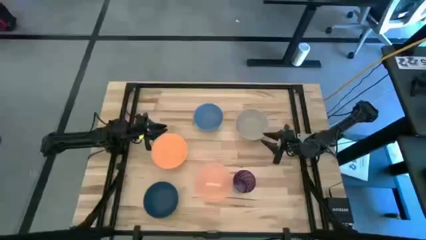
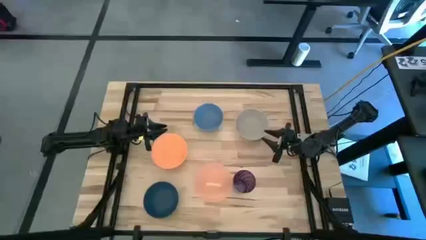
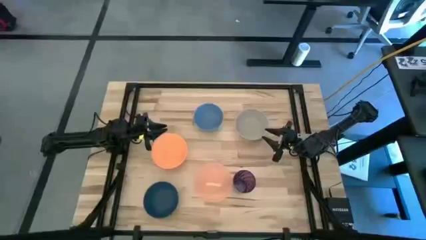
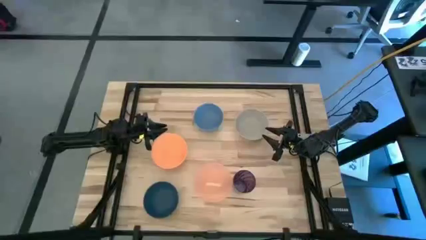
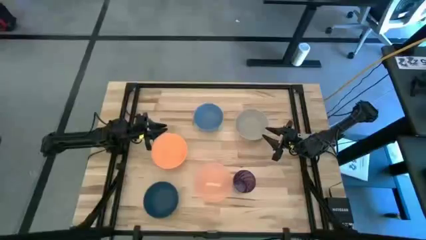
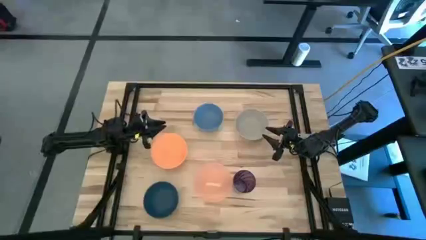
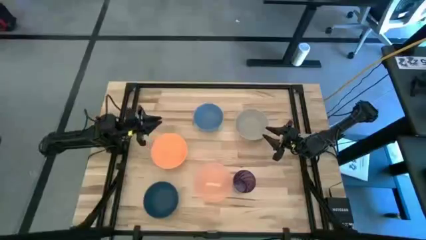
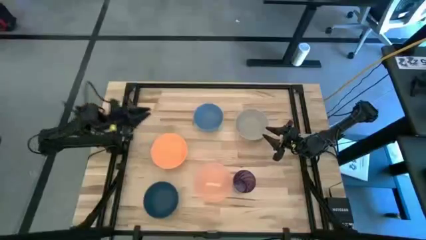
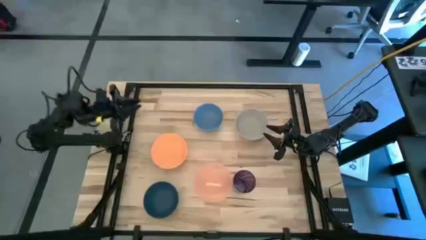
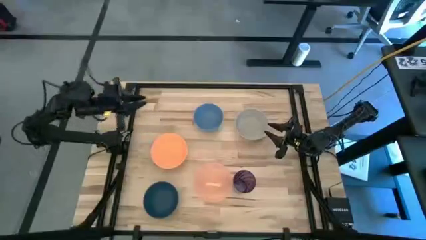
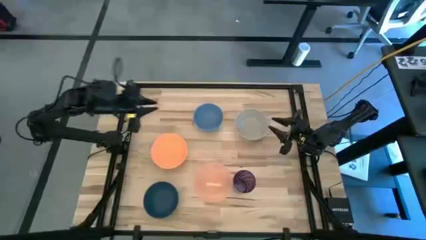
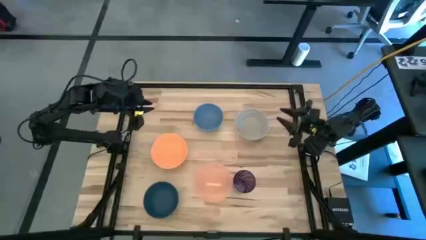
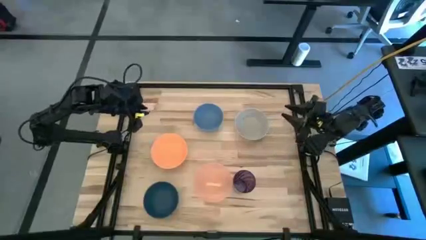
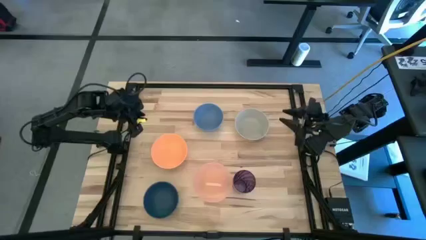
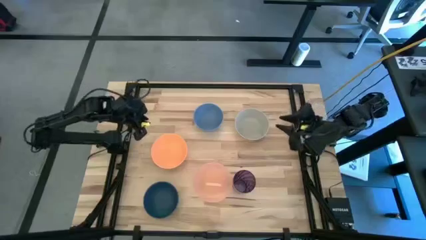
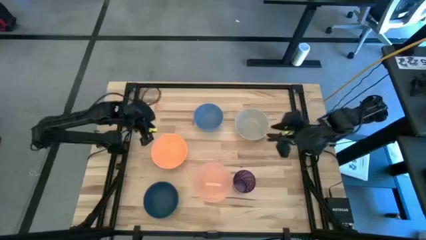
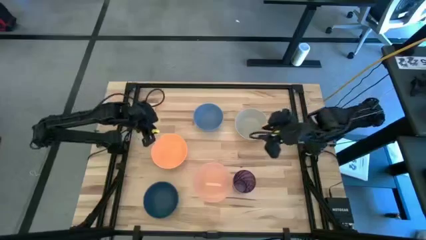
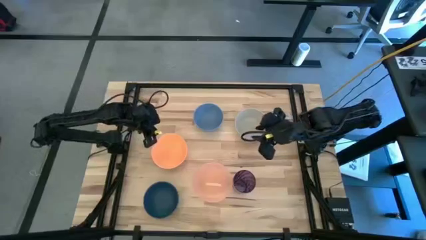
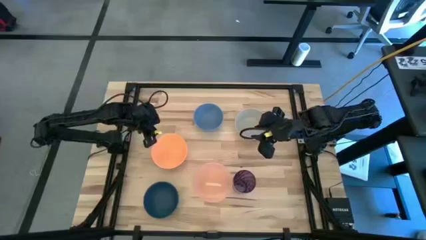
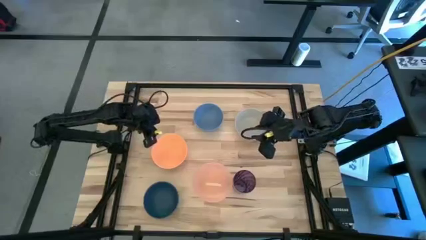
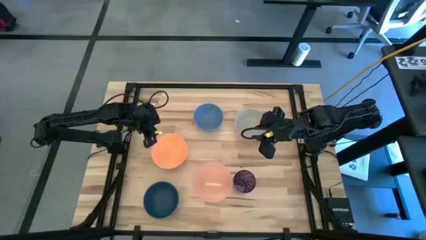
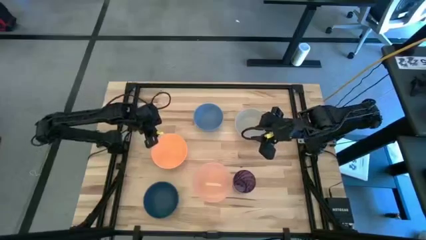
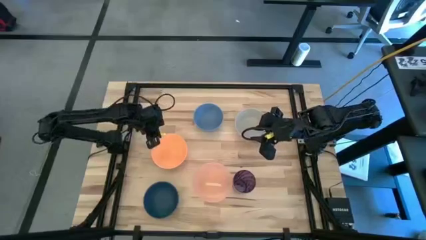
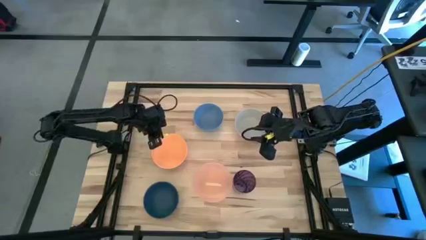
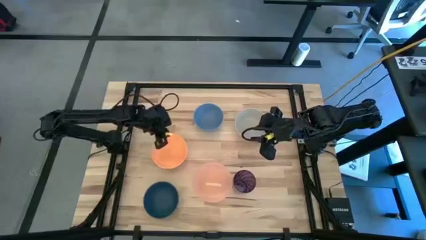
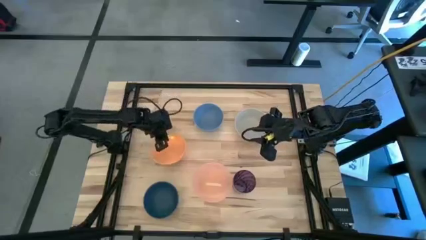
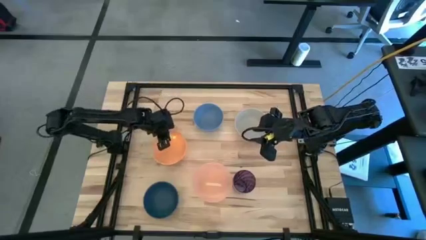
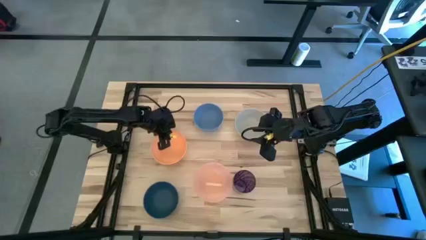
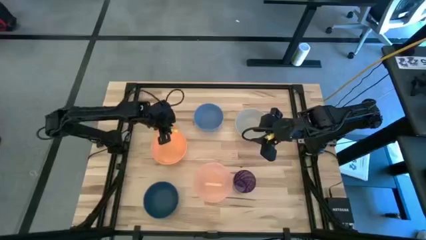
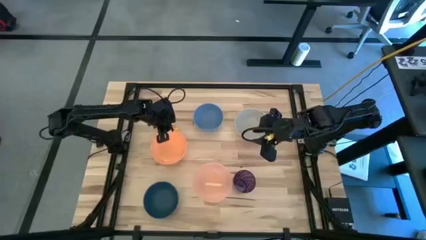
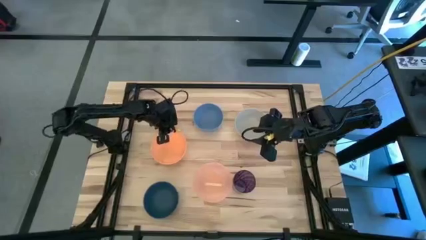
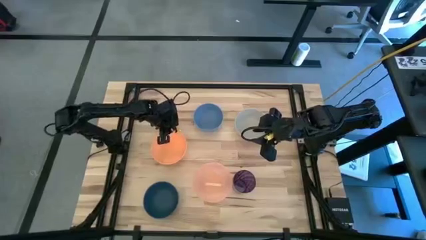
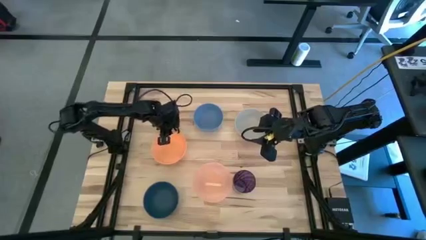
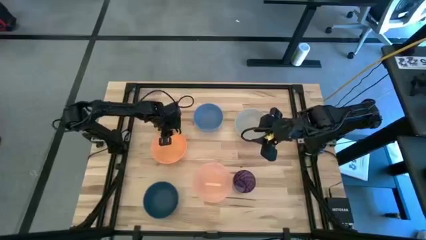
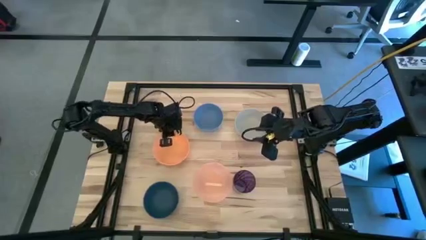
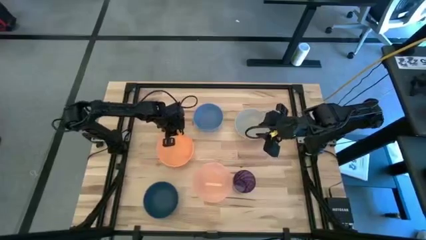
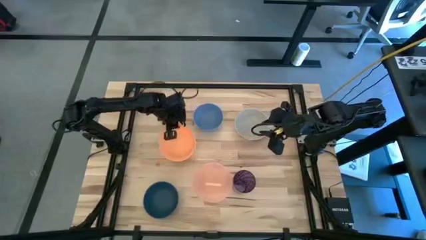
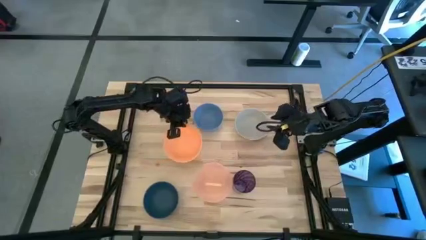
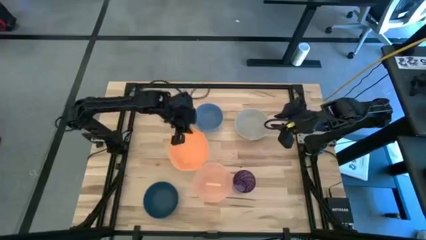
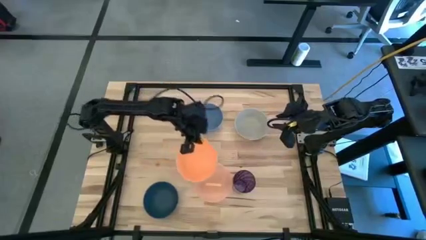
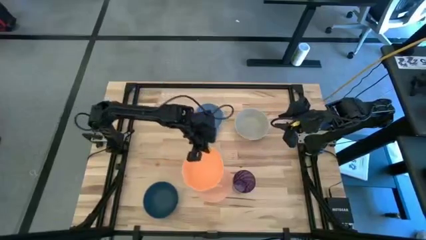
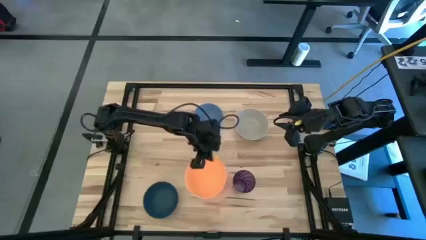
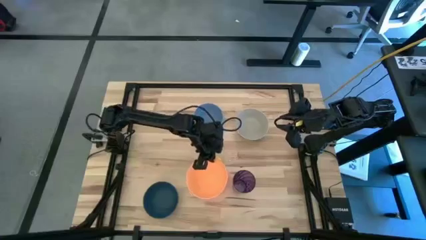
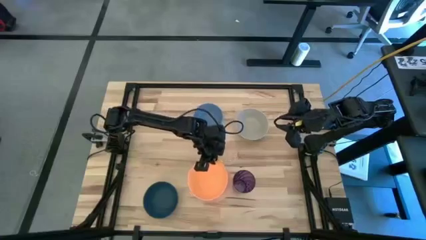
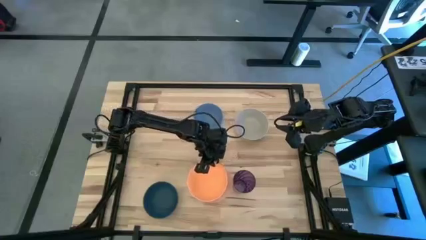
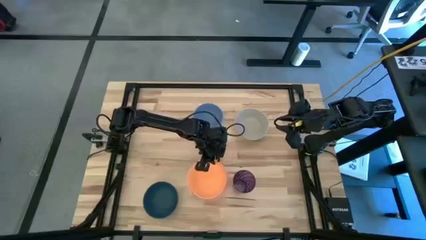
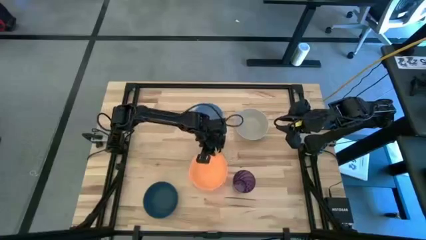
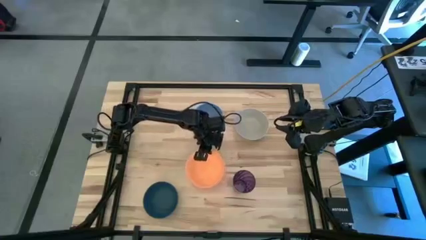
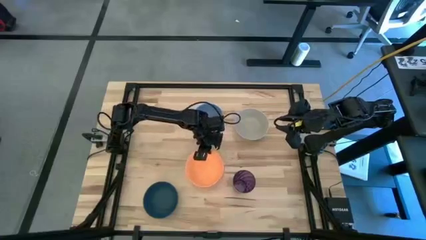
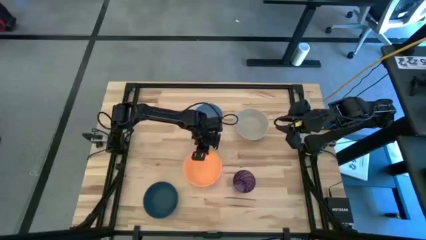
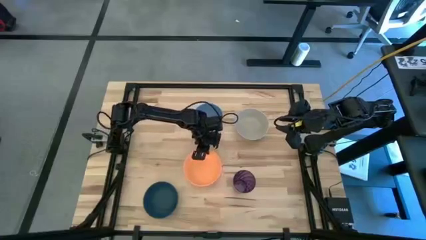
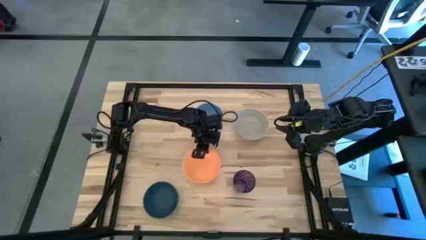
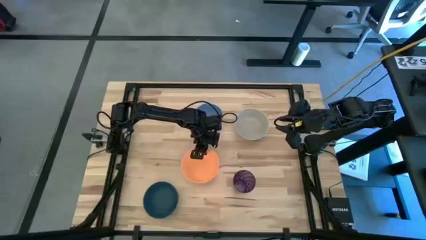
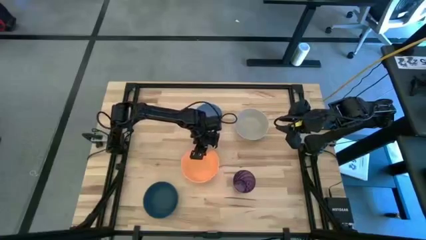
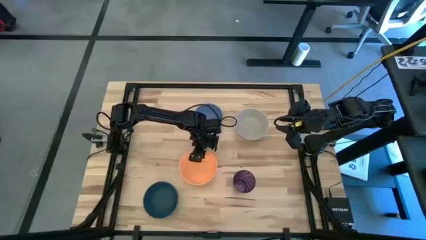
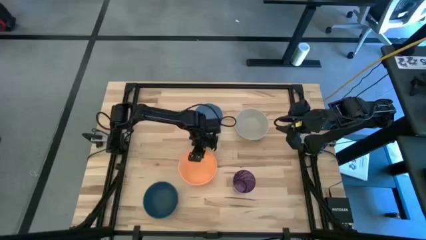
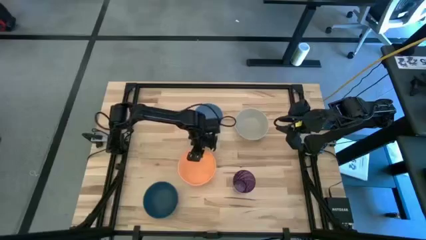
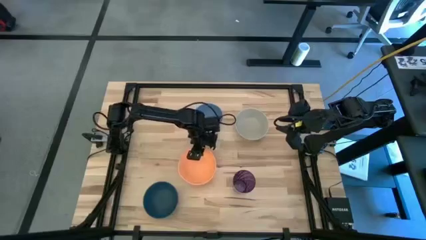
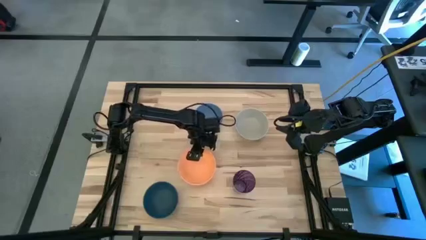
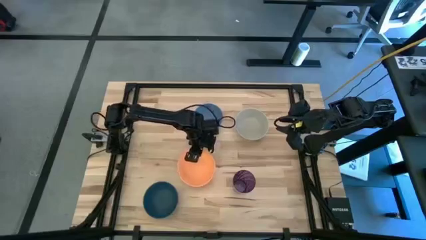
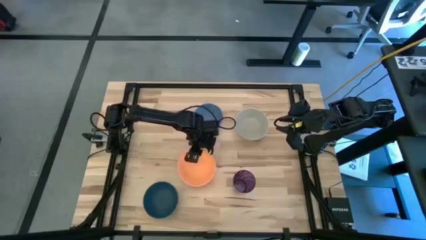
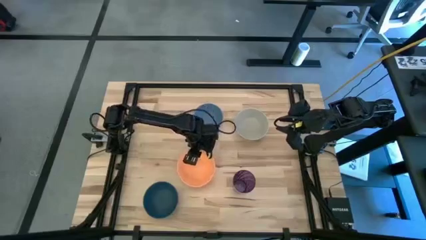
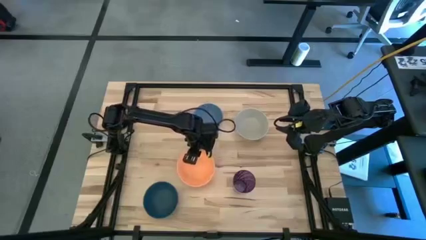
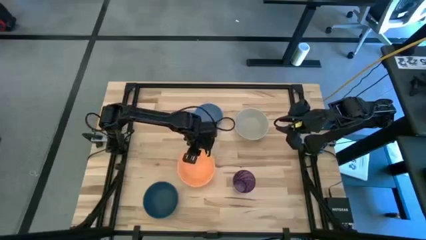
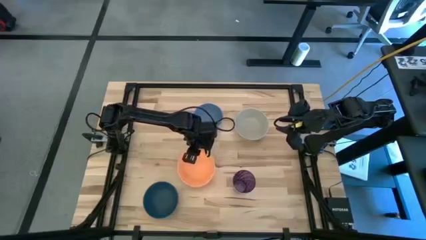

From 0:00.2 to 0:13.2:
Stack the orange bowl on top of the light orange bowl
